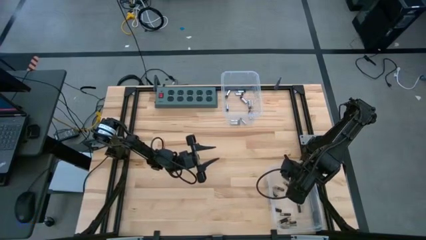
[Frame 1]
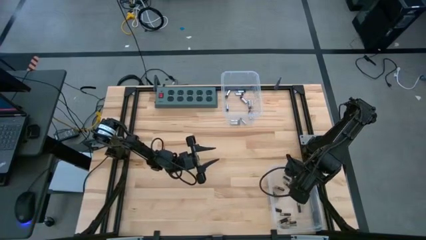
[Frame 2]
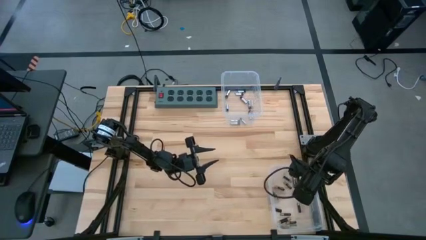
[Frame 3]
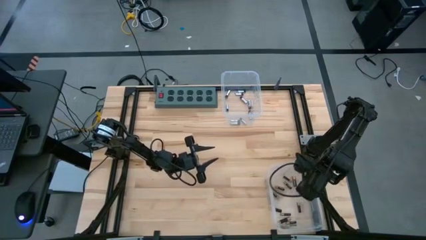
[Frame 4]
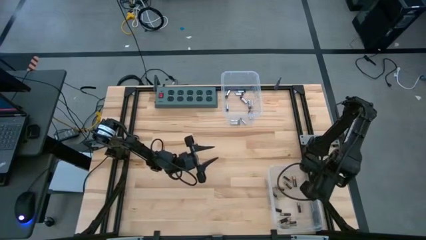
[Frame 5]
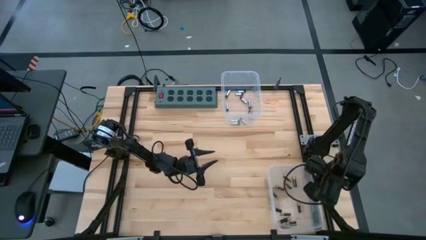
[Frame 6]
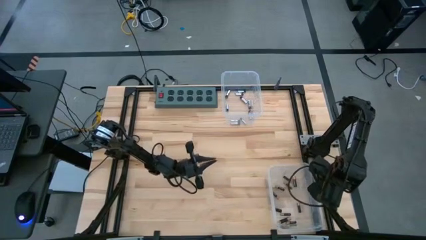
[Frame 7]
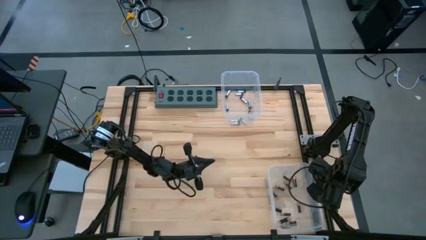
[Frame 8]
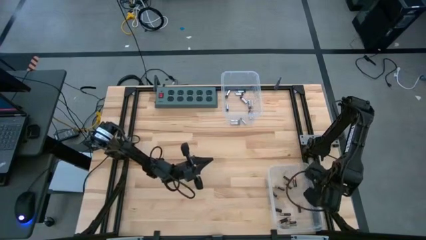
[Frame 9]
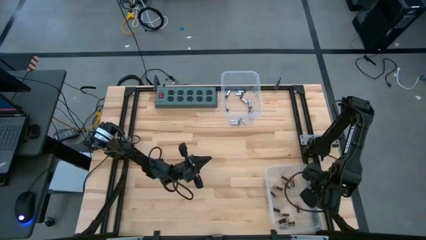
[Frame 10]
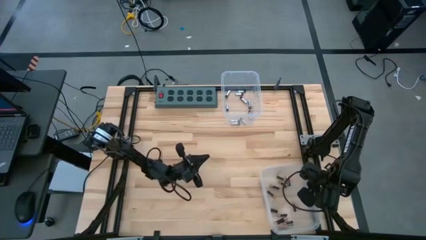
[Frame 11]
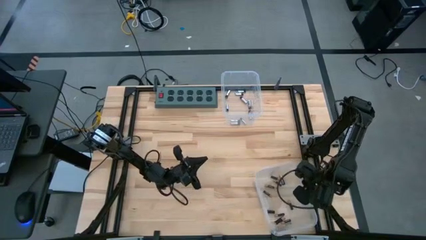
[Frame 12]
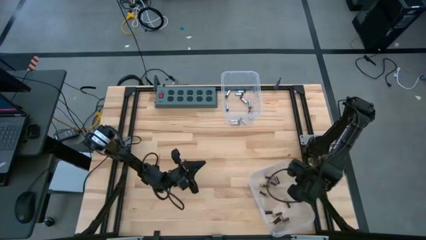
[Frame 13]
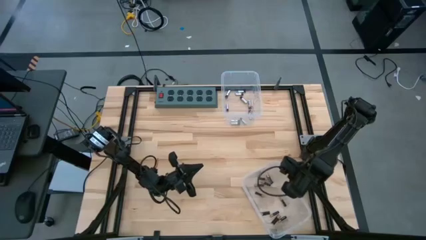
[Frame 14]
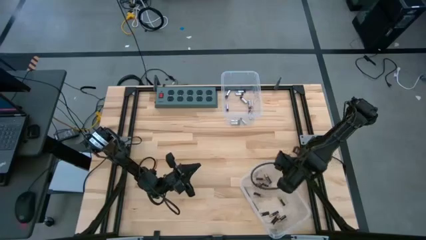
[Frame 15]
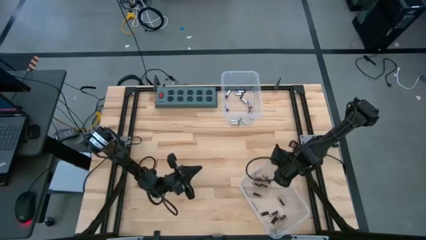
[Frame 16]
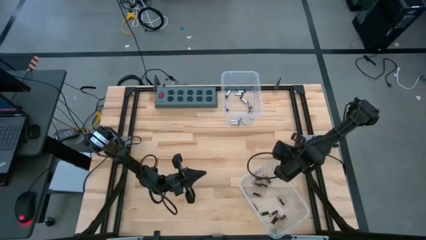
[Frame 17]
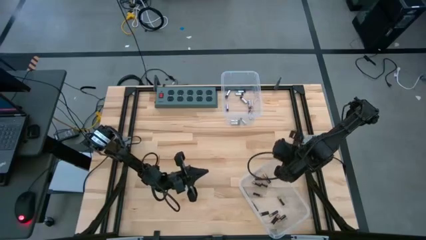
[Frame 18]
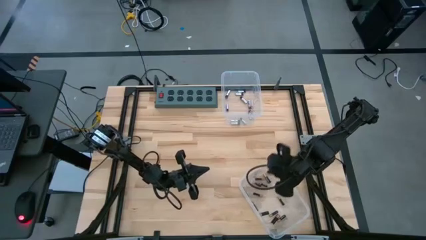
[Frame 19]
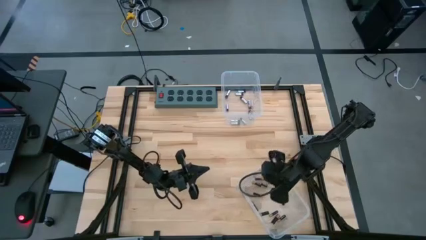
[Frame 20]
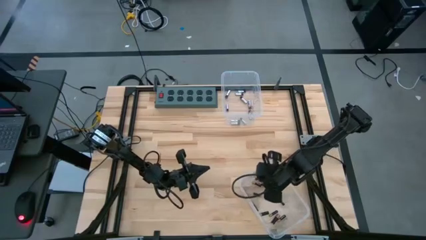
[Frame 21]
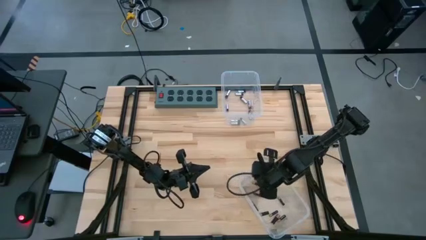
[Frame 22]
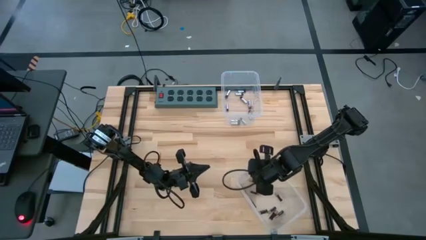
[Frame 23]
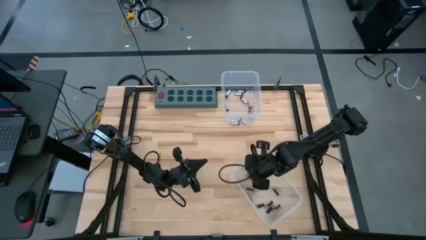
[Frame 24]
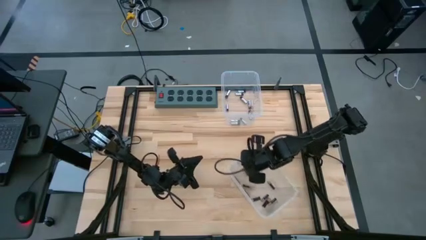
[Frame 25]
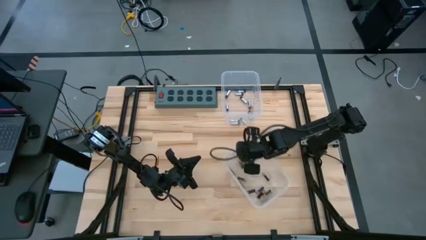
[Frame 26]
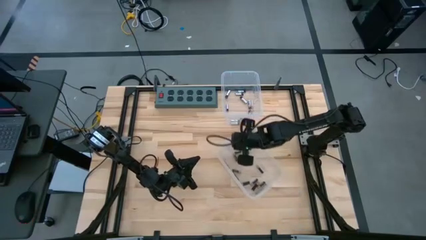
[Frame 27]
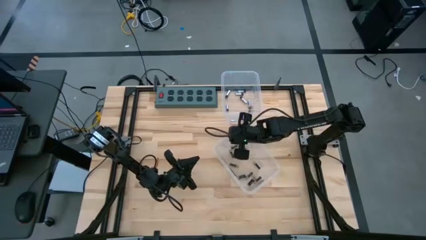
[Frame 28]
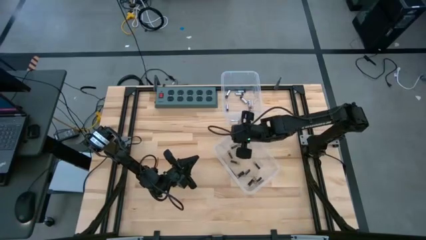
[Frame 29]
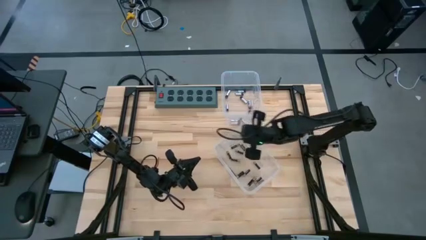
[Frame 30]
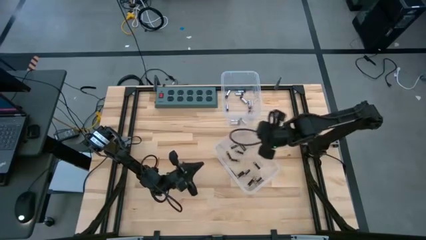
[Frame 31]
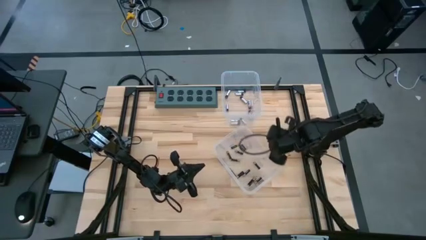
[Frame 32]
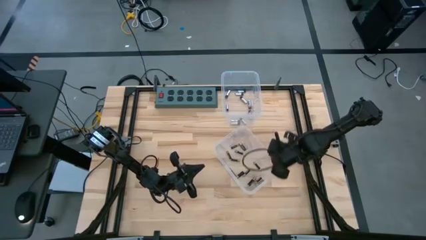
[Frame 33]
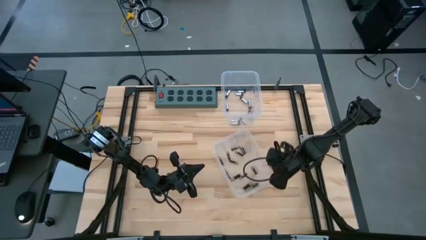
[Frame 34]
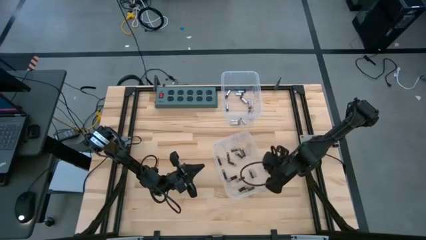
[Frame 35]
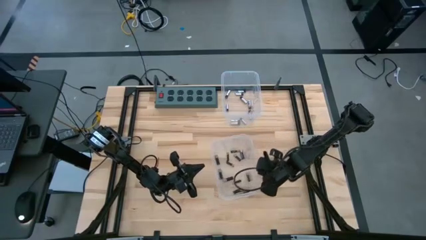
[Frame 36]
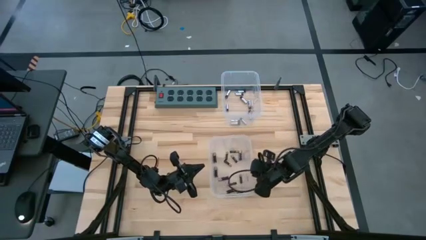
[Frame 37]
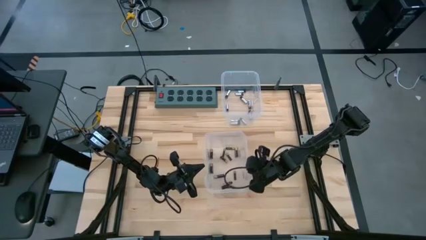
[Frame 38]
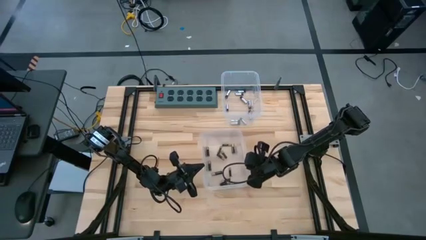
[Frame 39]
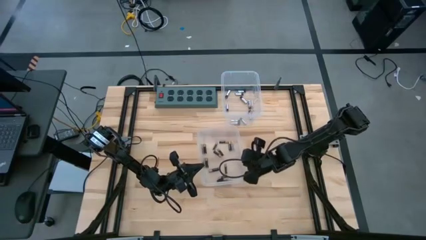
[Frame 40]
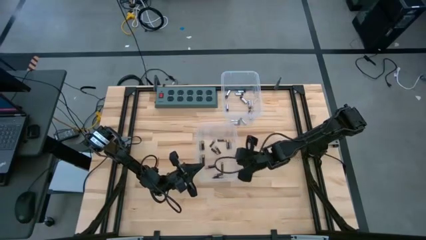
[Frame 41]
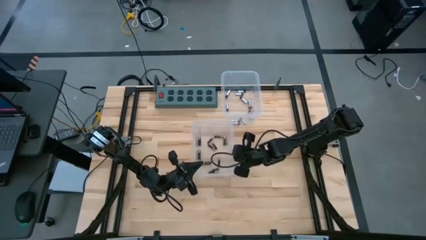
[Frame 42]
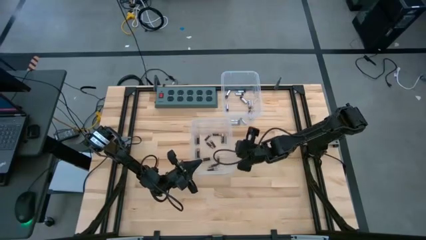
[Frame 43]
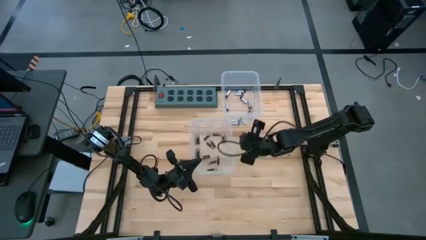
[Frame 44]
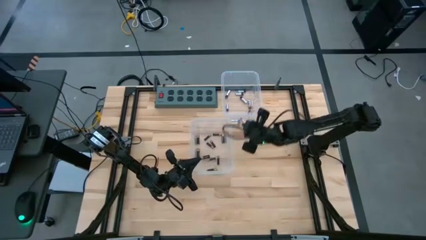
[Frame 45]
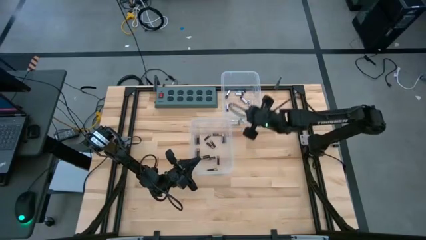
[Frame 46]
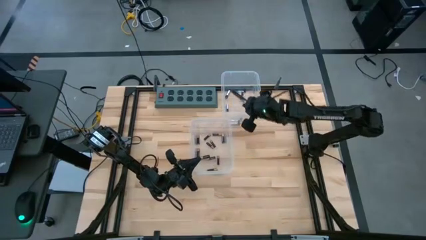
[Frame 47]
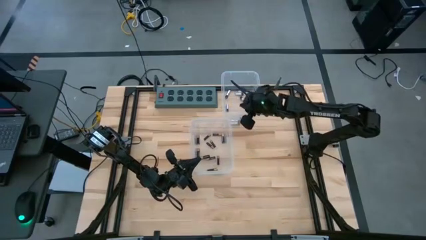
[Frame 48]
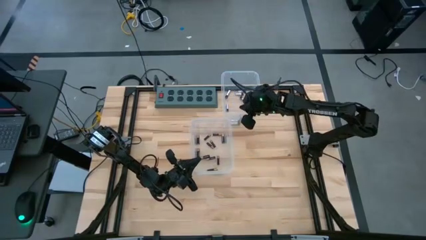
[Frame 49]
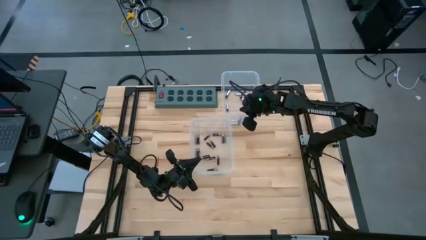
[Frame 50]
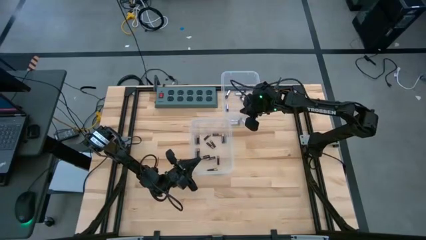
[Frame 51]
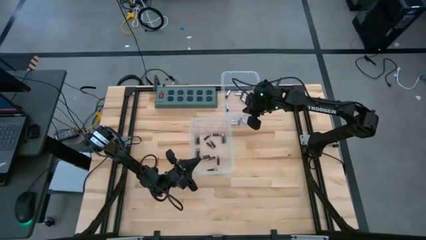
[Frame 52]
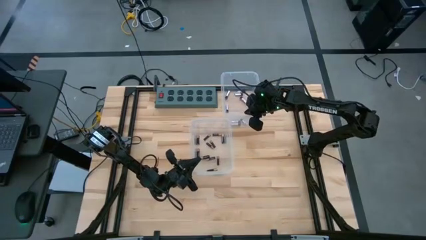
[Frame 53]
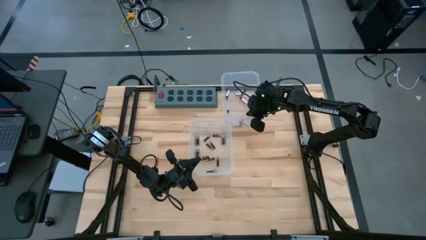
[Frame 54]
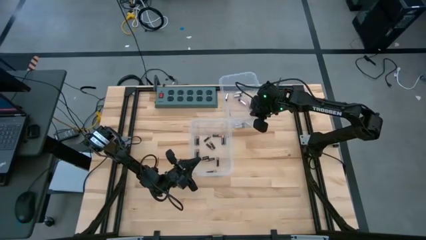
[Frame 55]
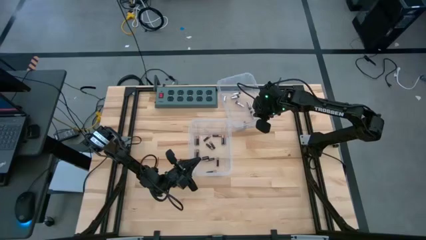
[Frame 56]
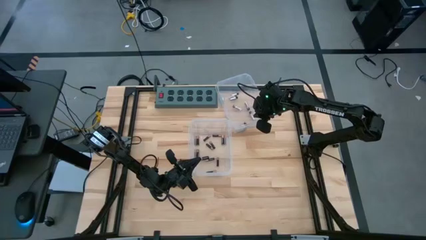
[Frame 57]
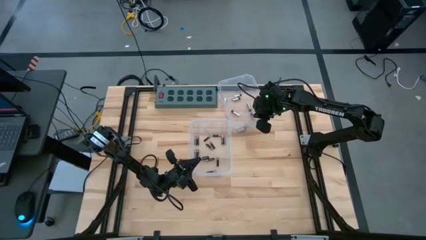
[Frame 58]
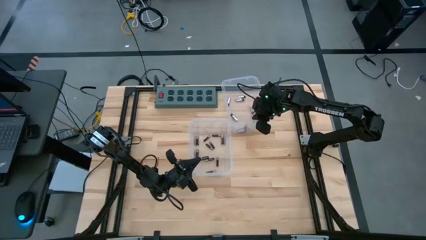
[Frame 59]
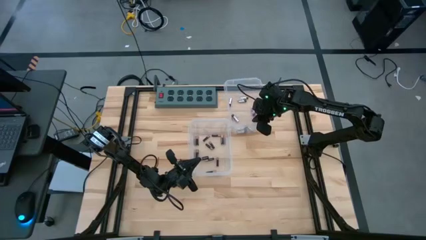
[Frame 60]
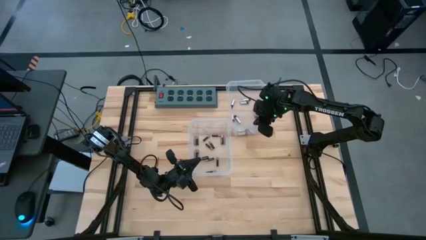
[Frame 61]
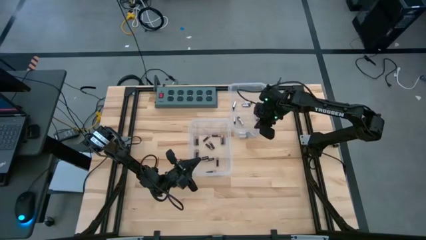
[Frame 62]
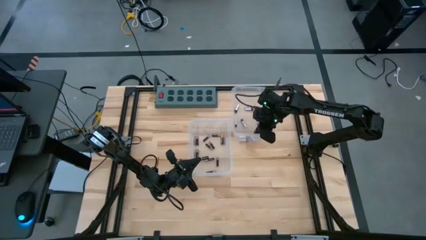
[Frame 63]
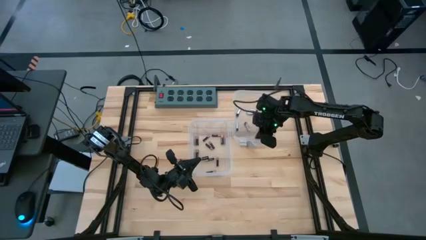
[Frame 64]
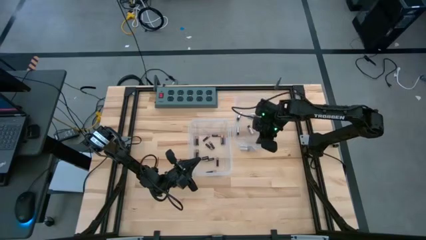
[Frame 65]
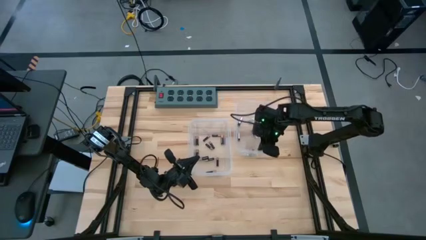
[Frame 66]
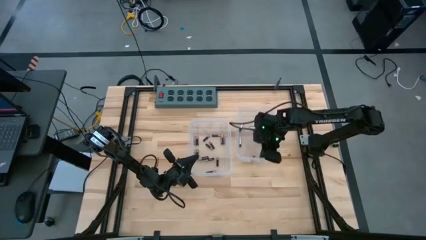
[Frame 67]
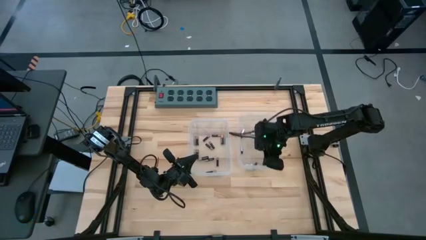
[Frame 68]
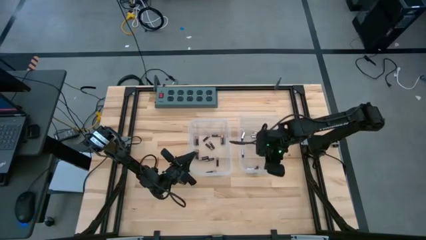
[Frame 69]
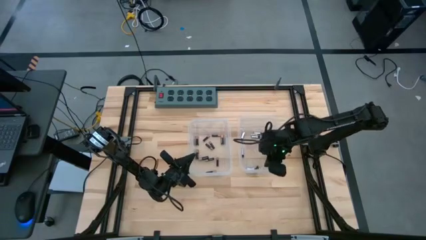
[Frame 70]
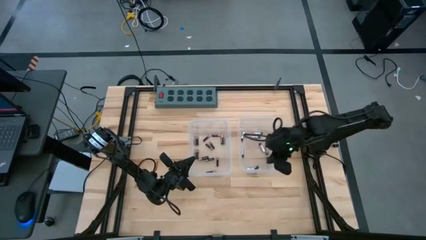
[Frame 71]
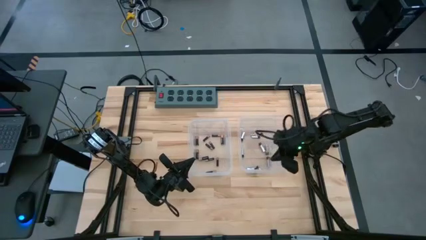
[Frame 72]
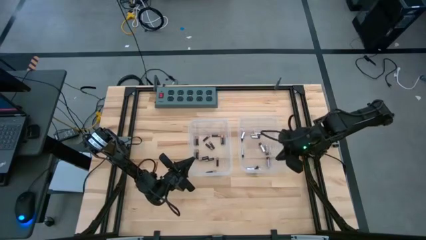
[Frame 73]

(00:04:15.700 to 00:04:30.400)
Task: Sort batteries
Move the transparent bins to the top right

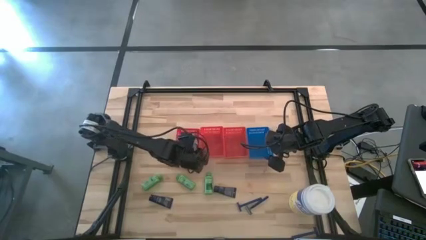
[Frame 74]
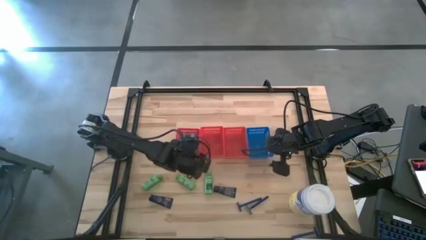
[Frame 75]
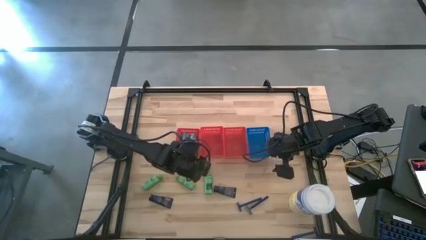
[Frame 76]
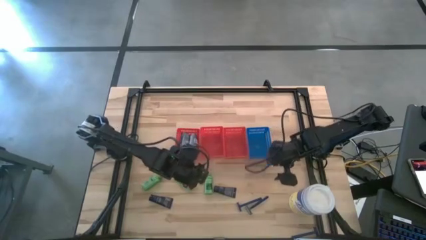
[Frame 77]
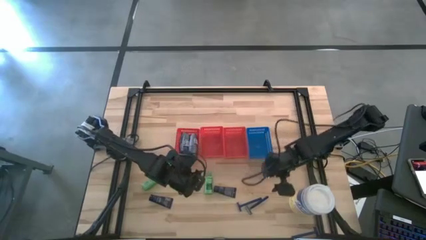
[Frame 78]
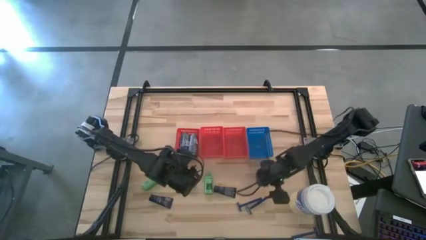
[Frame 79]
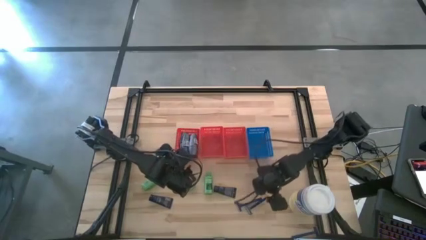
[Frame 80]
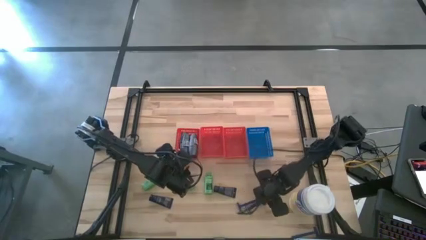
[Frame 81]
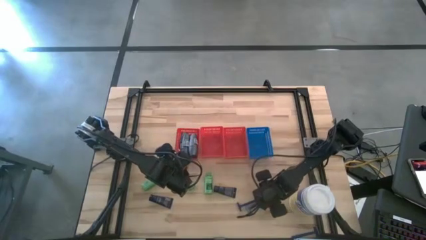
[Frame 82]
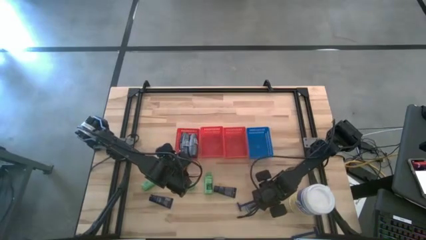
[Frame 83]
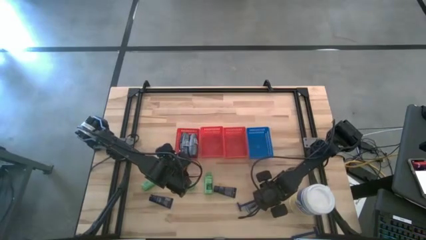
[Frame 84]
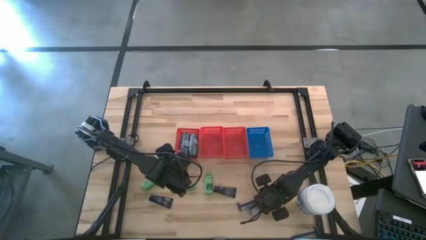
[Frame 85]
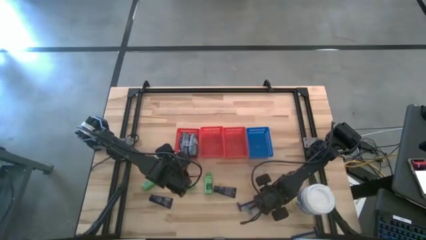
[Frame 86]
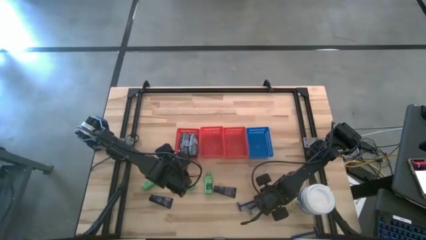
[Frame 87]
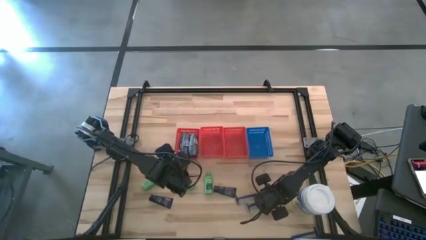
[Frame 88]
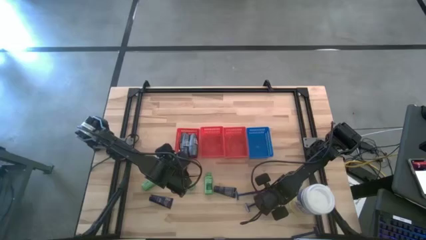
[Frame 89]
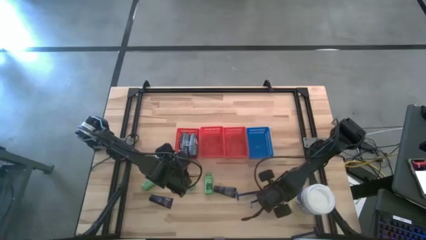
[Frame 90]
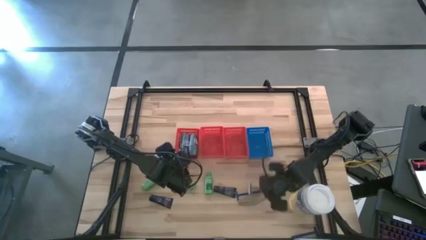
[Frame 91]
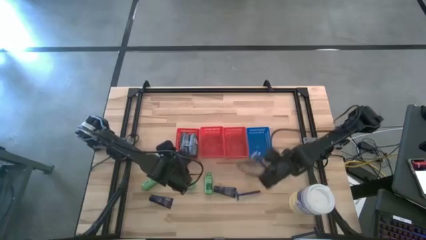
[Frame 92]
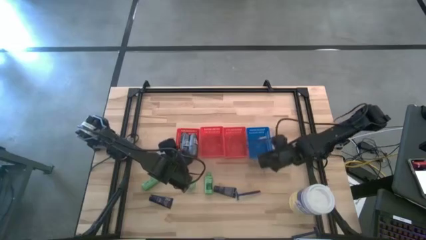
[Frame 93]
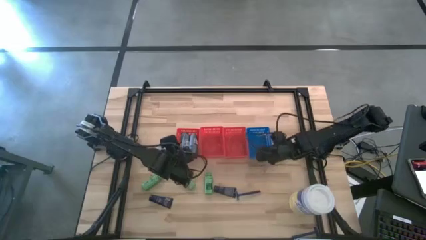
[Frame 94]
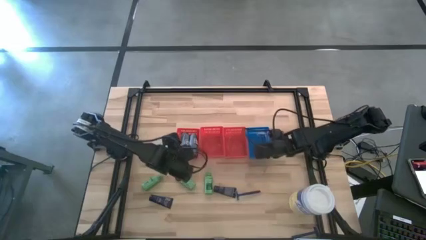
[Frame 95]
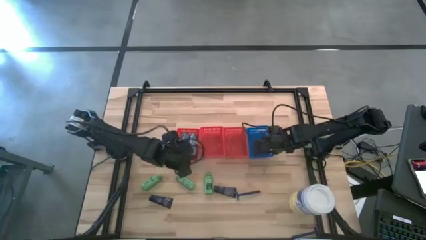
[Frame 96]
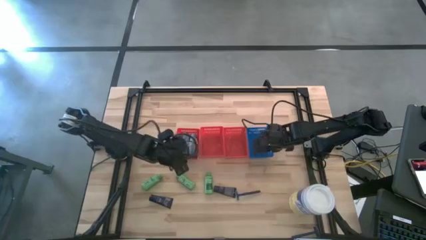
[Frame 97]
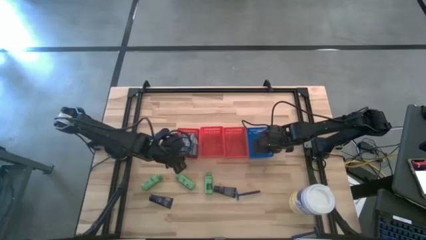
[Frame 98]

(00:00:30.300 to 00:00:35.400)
Task: Pick & Place Travel size toiletries
Put the blue razor into the blue bin
